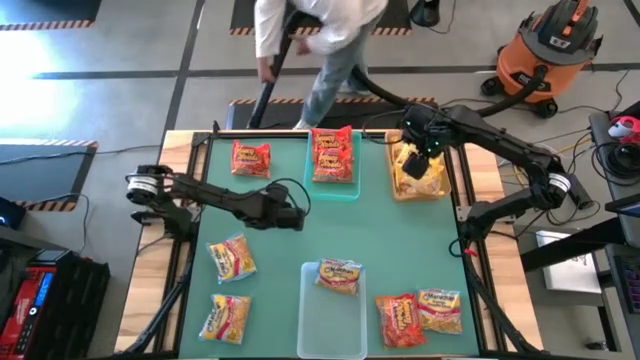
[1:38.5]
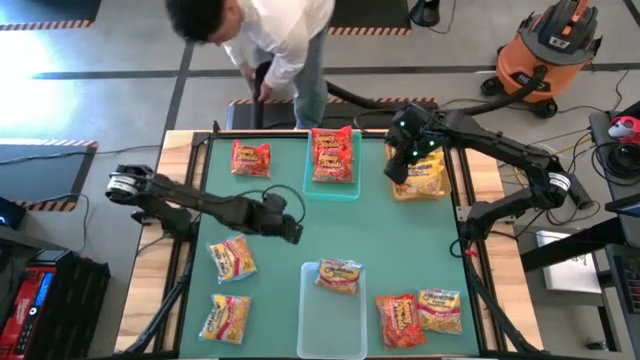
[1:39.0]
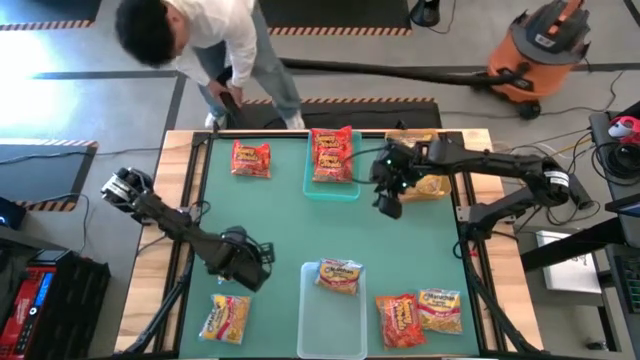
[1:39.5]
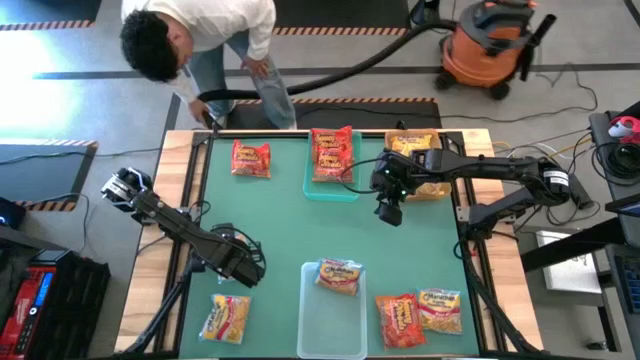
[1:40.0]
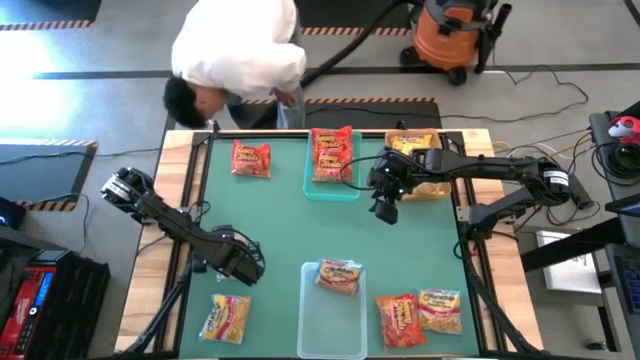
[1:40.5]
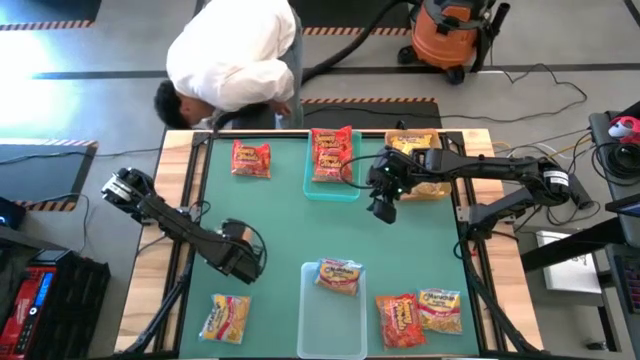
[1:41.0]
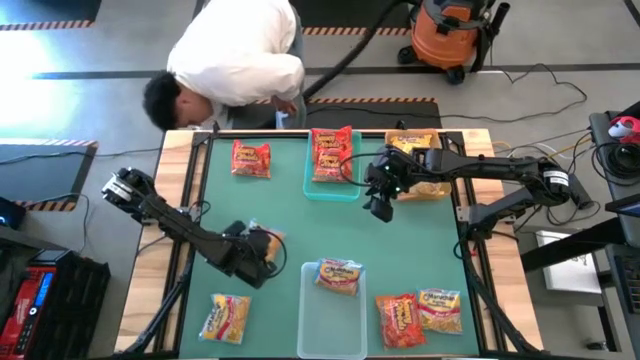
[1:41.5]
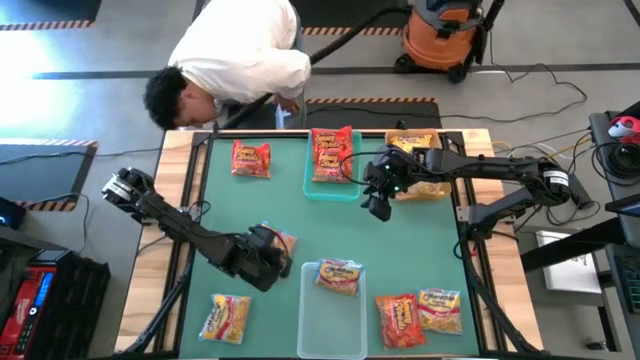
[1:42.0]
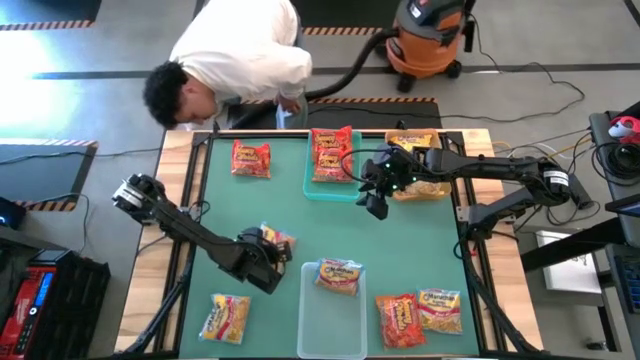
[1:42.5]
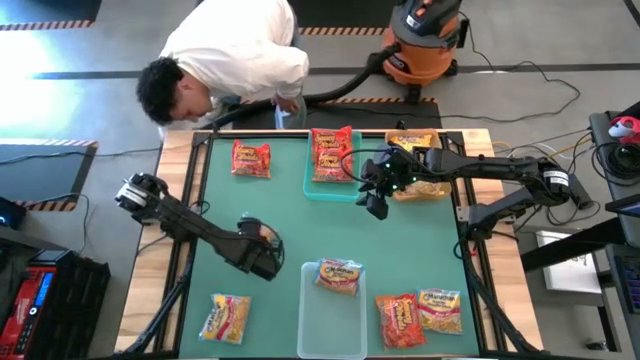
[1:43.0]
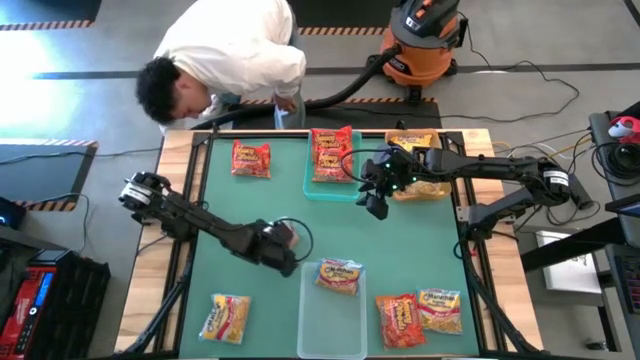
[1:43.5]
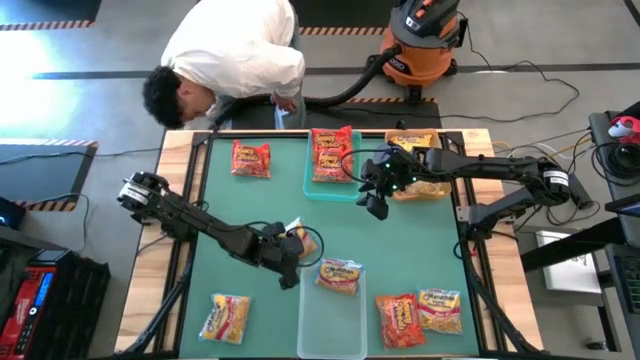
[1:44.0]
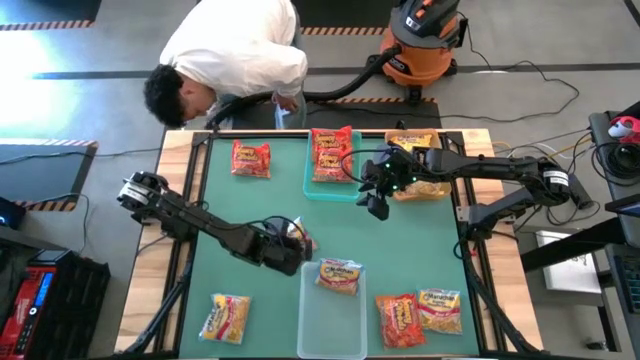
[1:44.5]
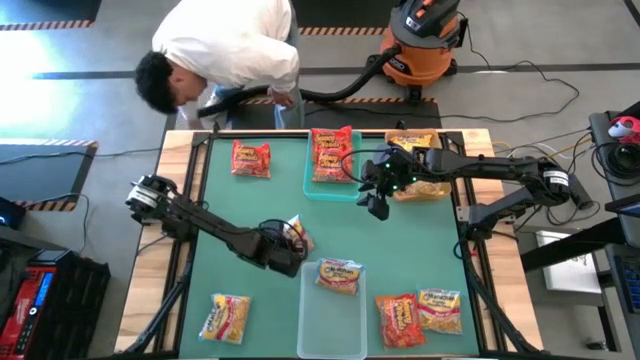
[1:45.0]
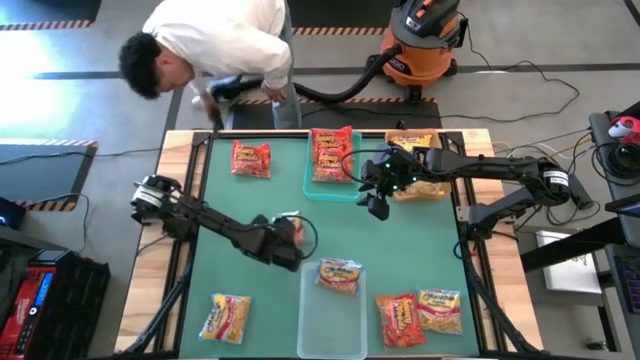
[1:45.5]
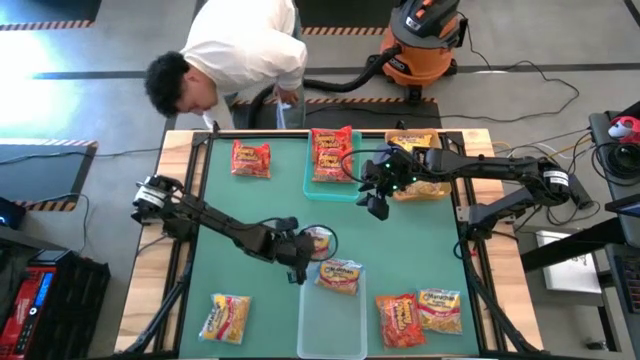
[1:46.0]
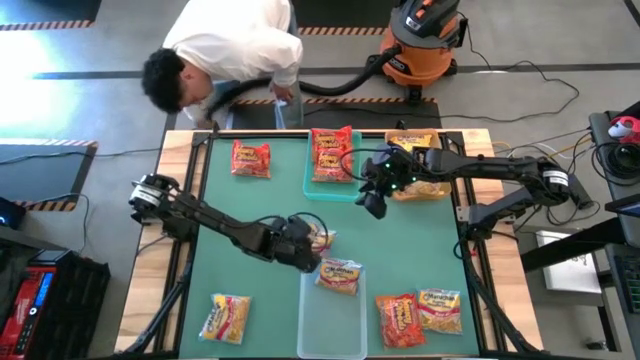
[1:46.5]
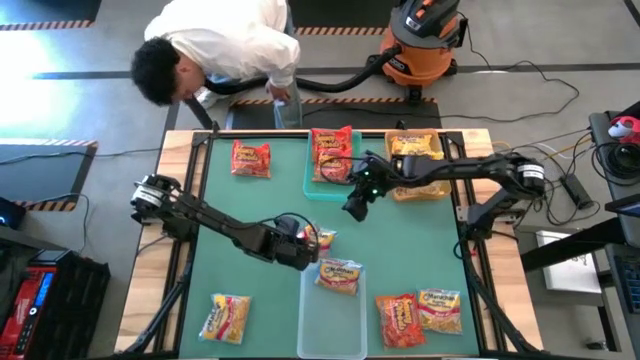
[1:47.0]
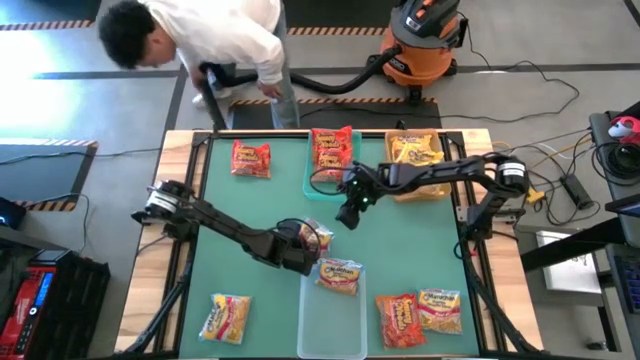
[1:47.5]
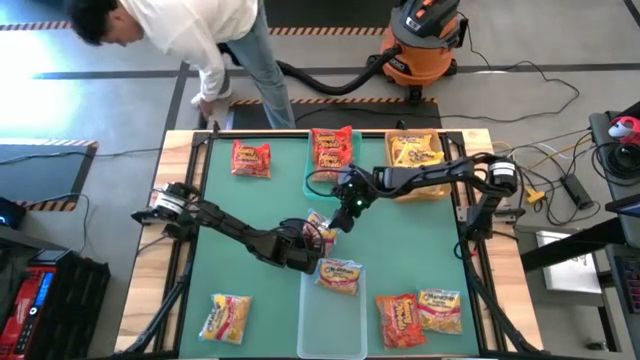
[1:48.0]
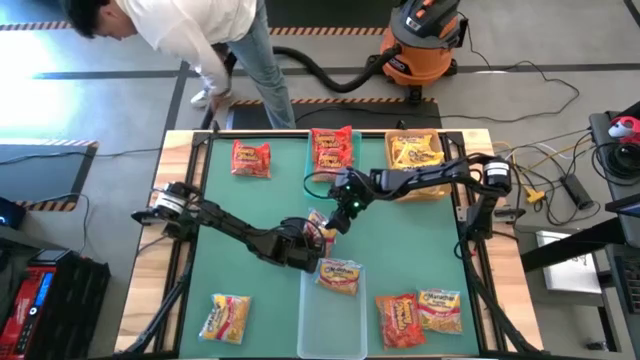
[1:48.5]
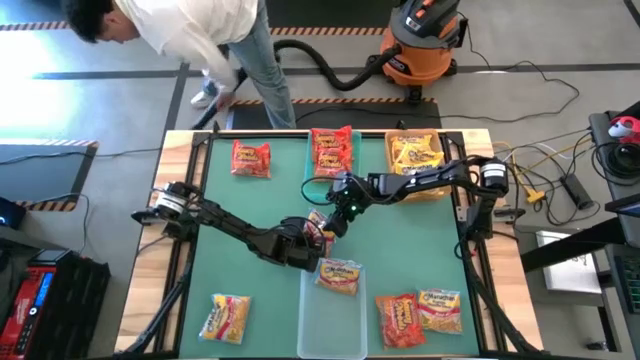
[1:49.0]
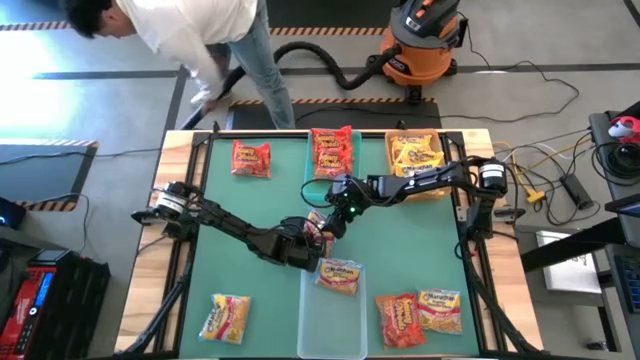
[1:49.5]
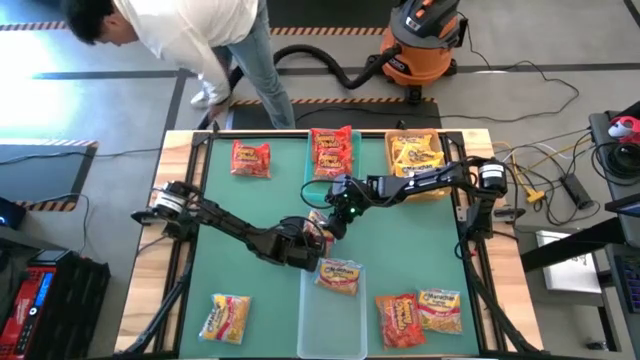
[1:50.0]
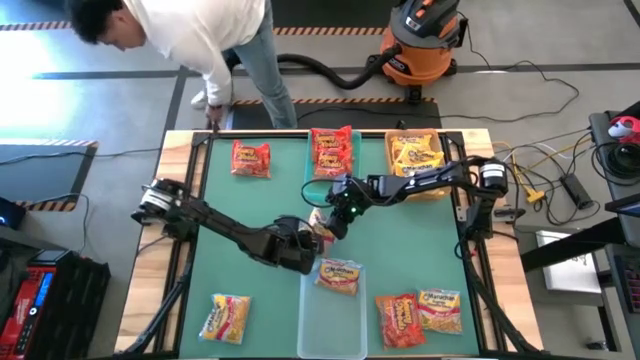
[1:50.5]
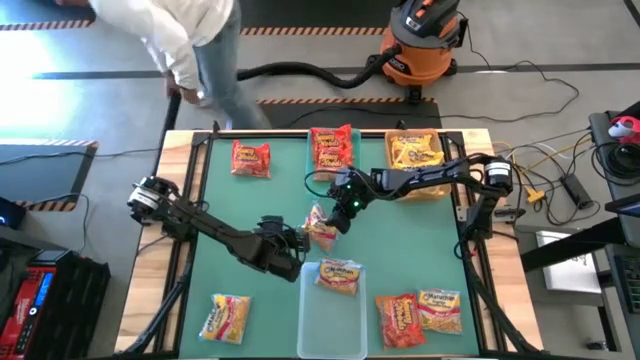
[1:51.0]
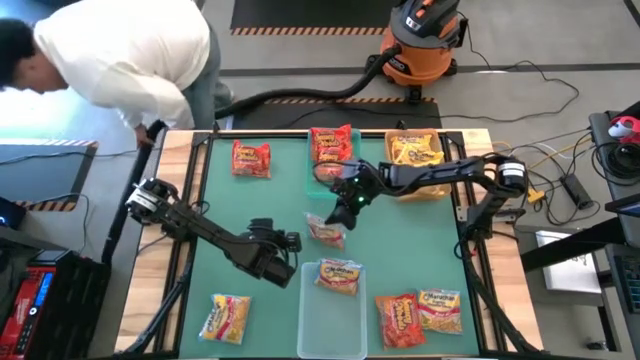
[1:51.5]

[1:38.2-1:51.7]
Task: Sort Maruchan noodles
Put the blue noodle pack into the transparent bin

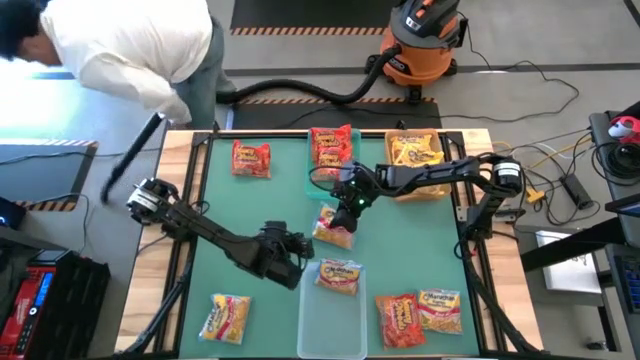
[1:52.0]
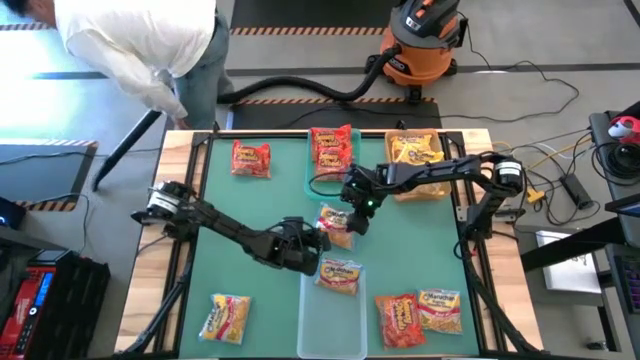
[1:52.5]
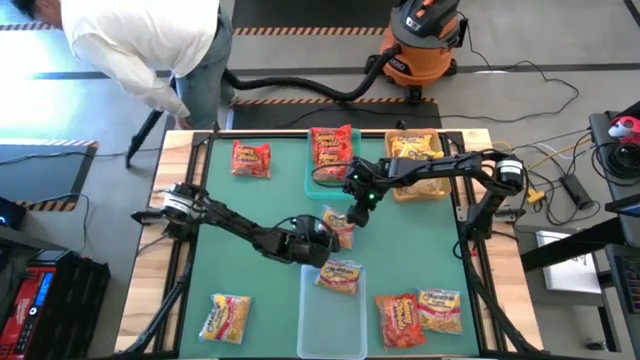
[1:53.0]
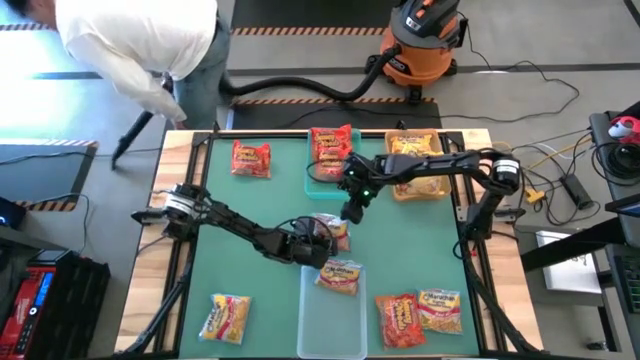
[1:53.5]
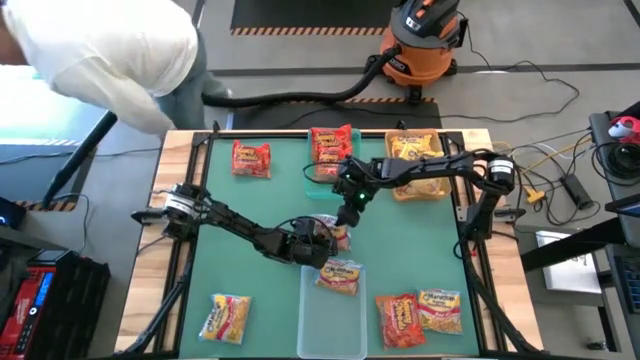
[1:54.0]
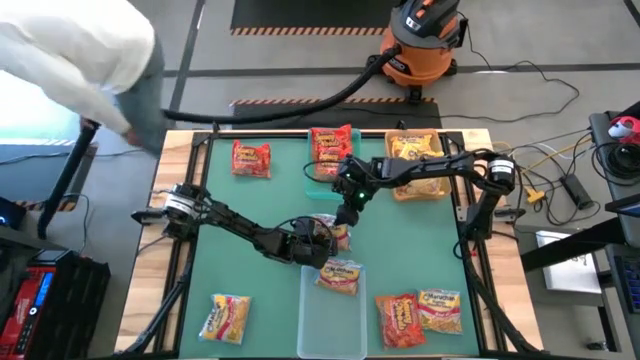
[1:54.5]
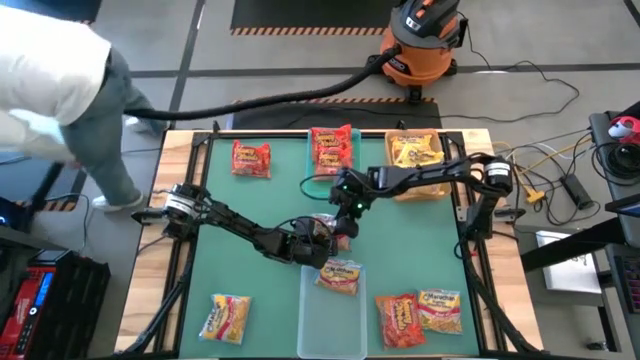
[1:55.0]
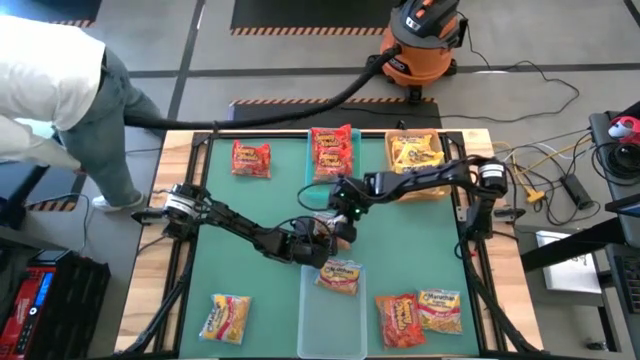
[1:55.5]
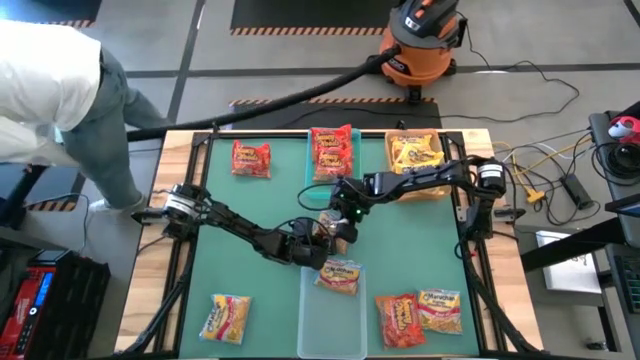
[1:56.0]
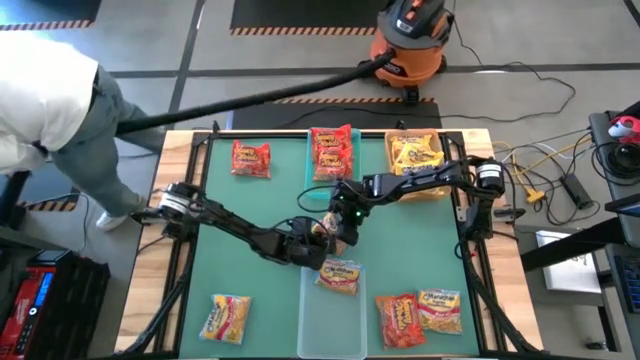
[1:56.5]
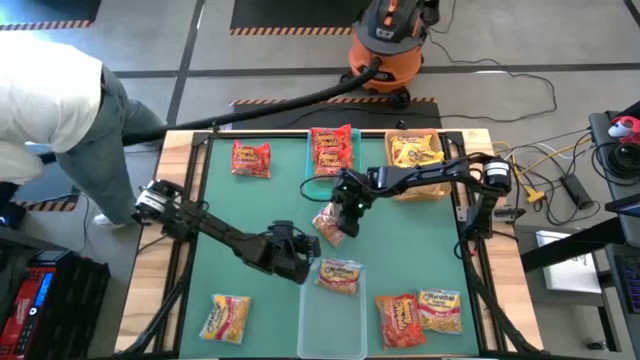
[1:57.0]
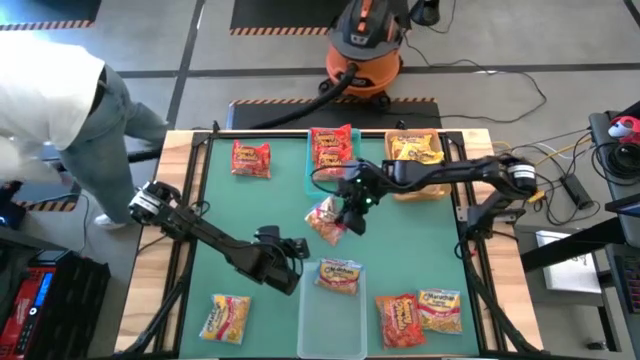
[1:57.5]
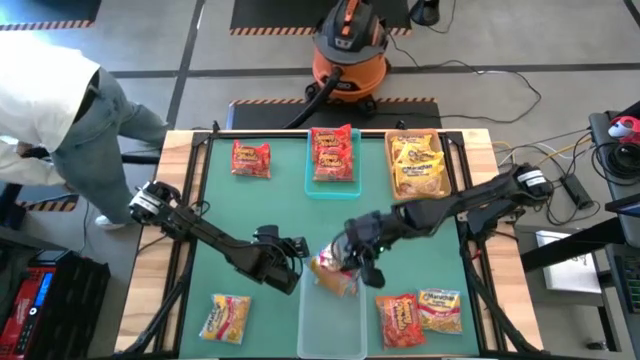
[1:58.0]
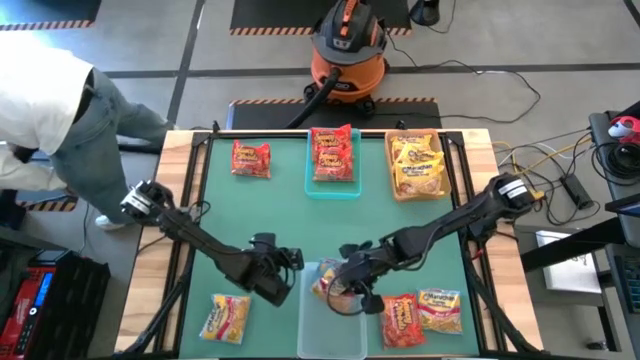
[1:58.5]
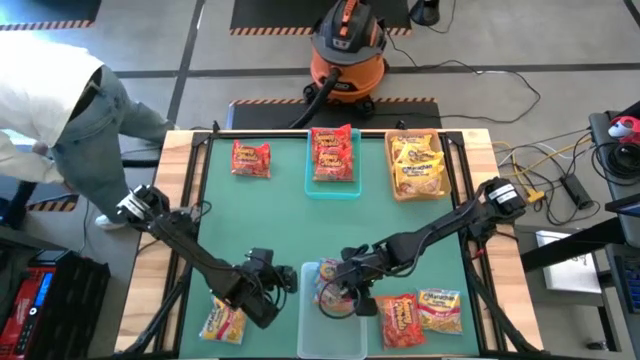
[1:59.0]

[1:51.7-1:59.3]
Put the blue noodle pack into the transparent bin
